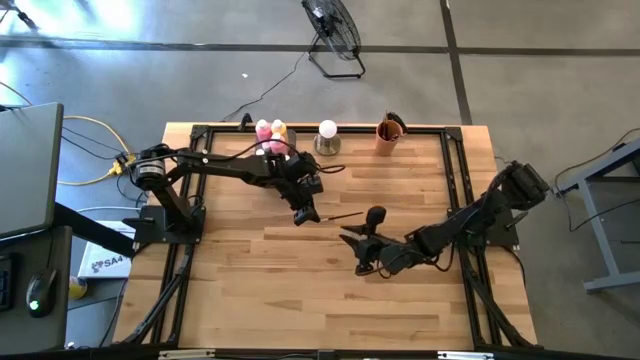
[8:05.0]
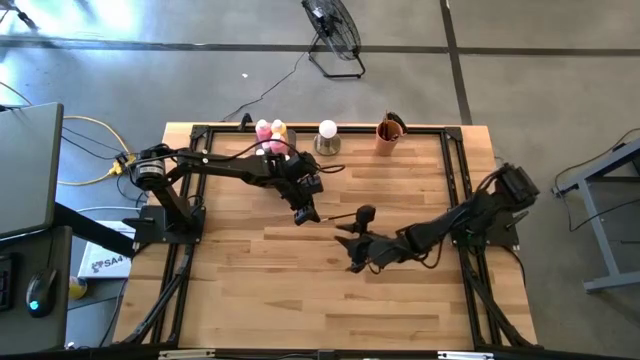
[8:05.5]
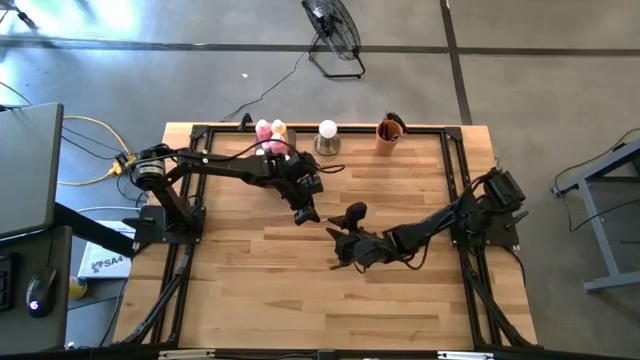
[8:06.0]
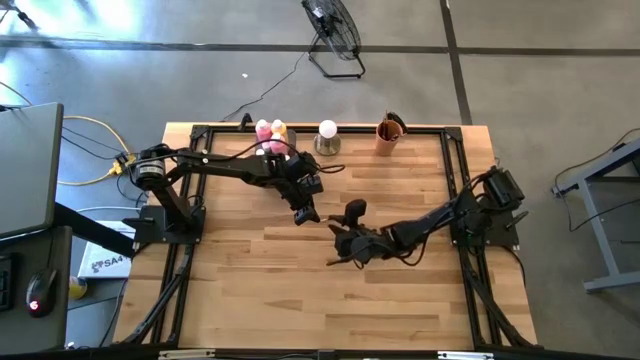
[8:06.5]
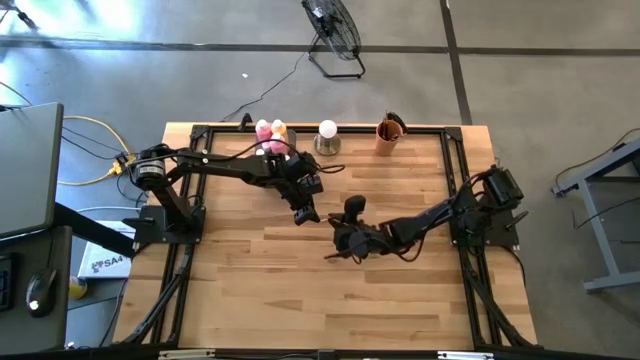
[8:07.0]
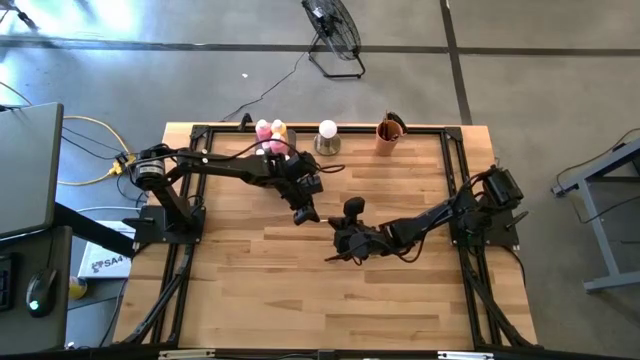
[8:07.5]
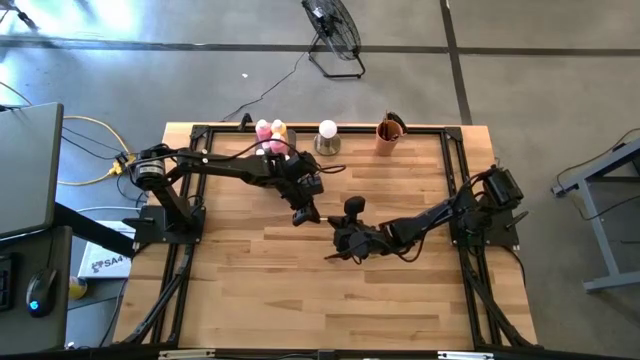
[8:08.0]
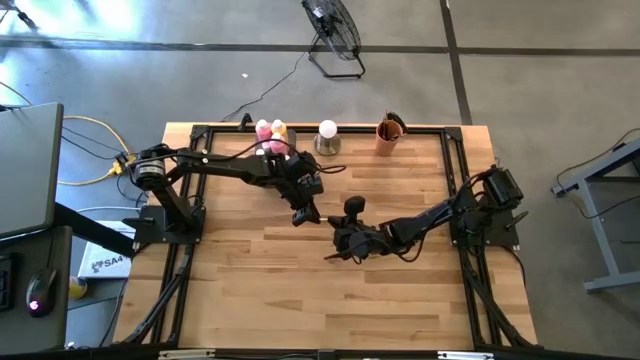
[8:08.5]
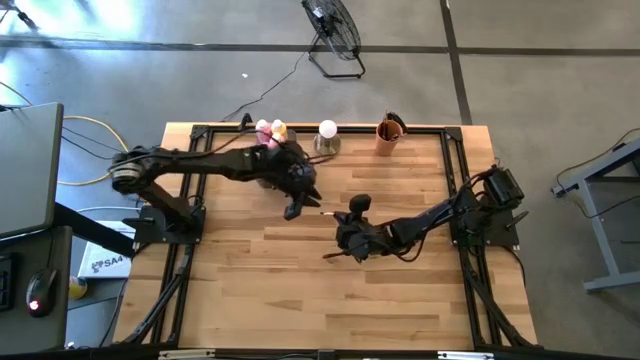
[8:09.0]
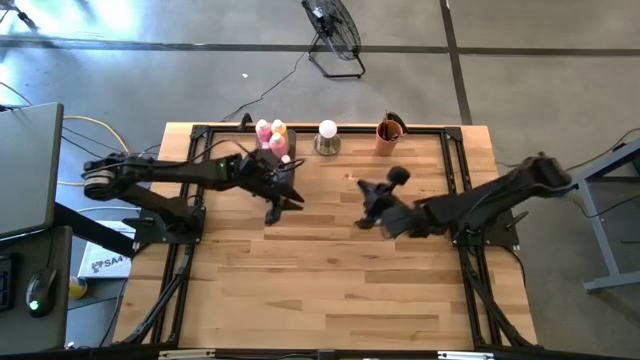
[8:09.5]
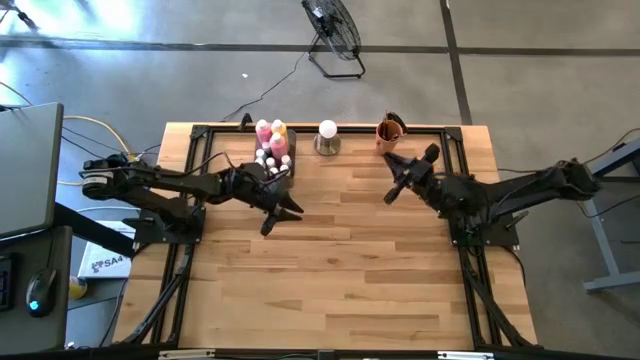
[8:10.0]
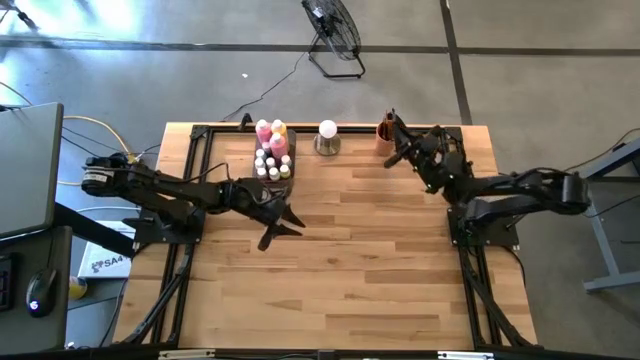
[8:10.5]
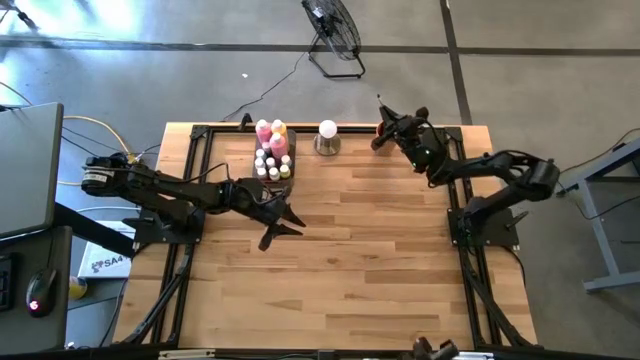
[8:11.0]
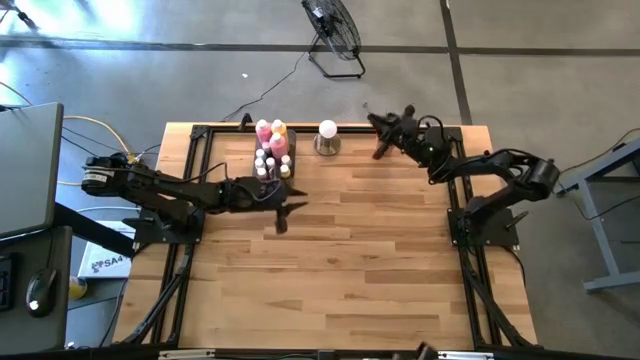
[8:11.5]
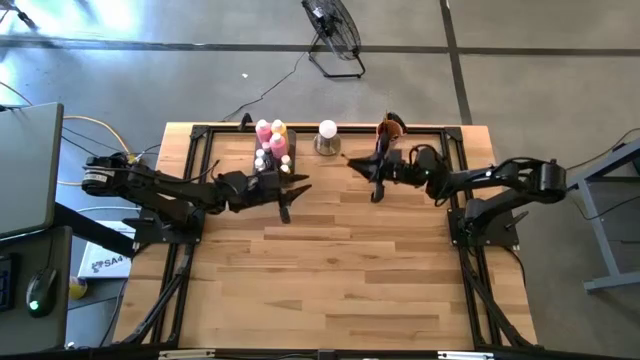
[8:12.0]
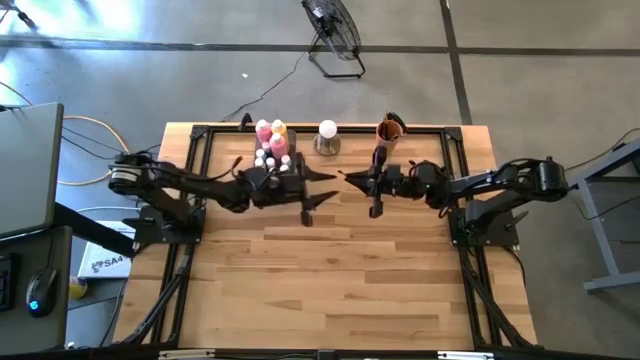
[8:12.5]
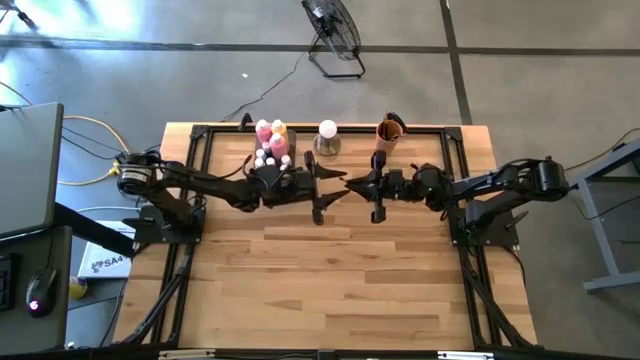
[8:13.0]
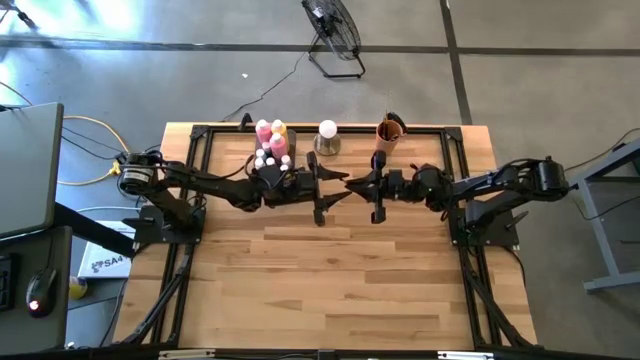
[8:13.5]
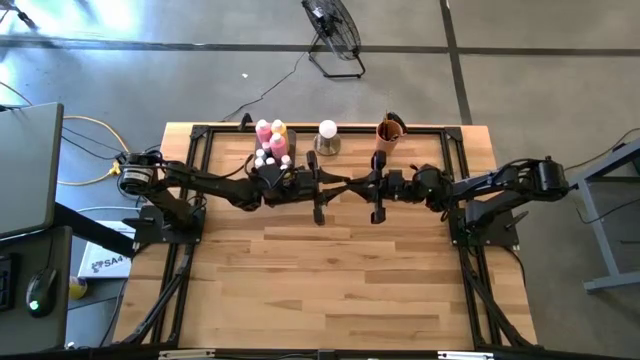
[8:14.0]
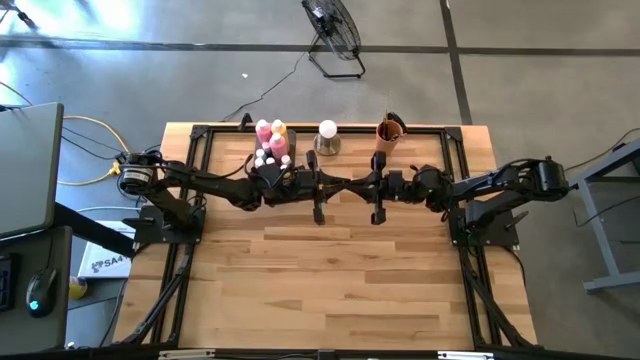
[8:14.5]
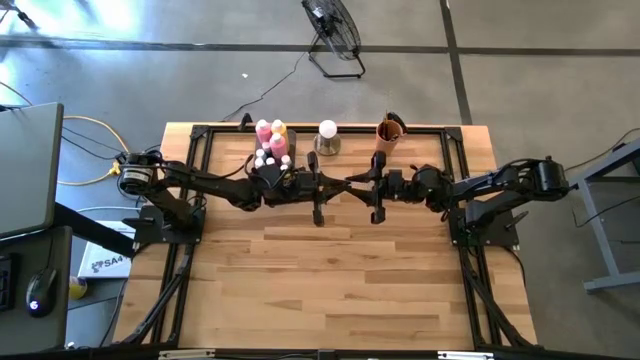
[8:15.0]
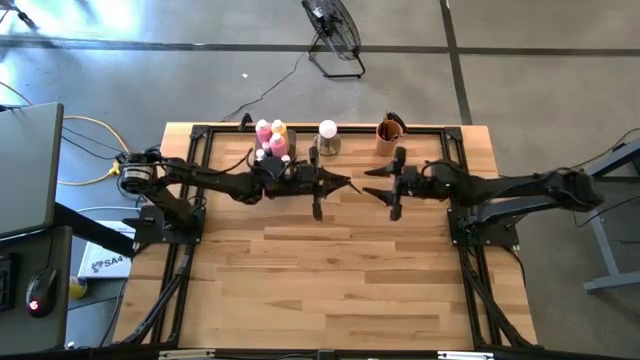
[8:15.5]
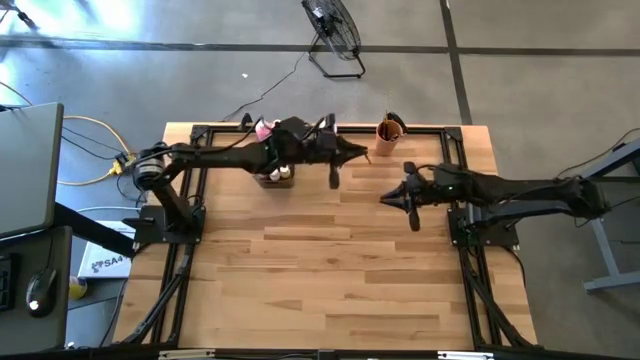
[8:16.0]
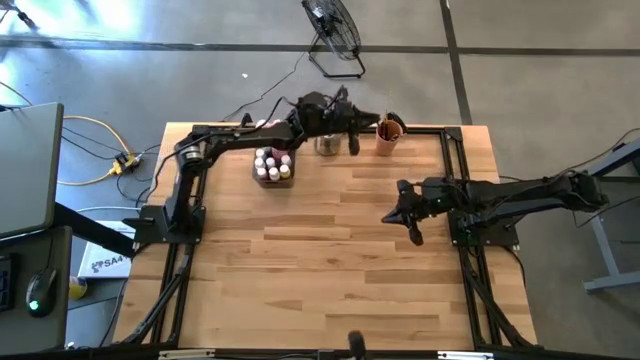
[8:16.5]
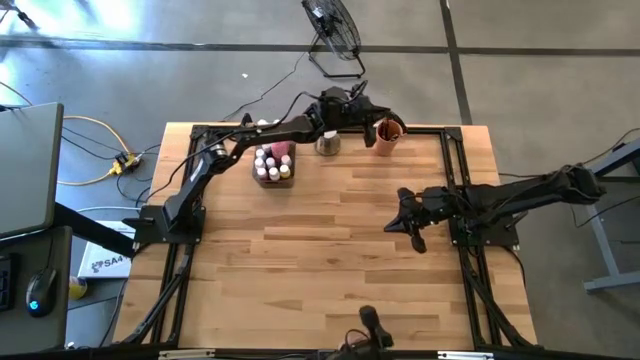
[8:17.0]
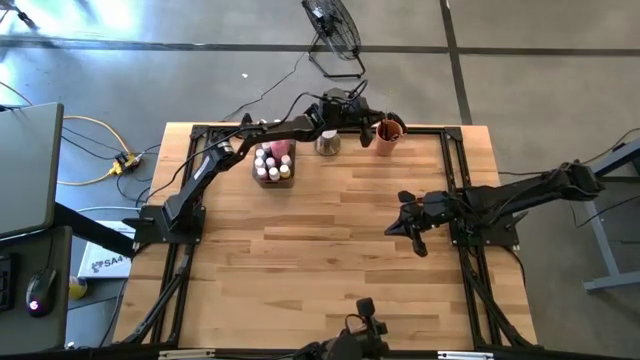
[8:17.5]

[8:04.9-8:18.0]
Task: Pick & Place Paint Supplies
Put the silver paintbrush into the orange cup

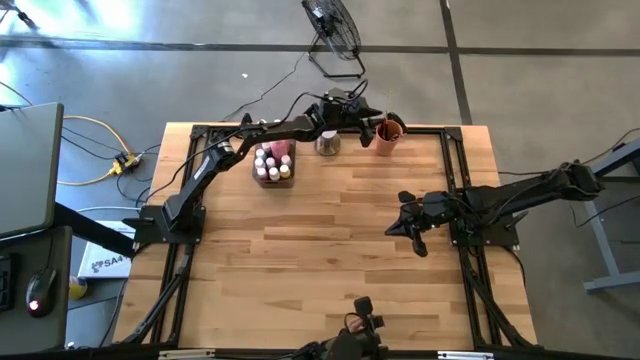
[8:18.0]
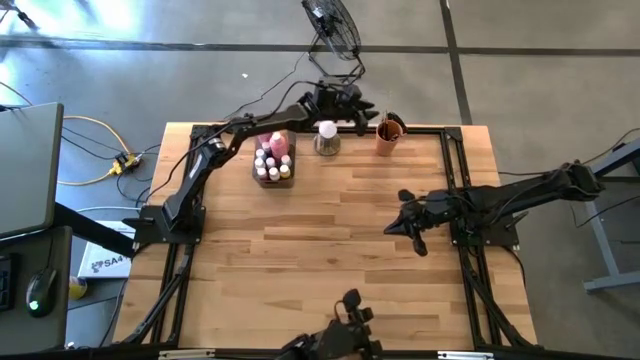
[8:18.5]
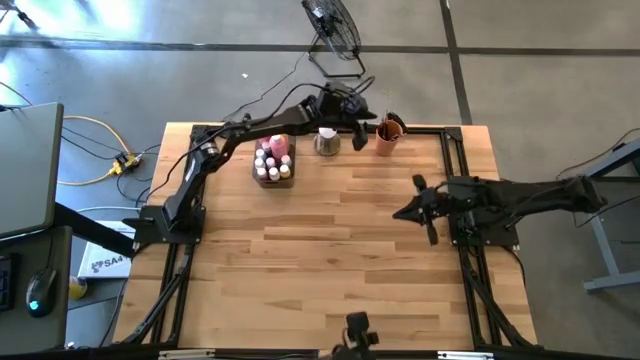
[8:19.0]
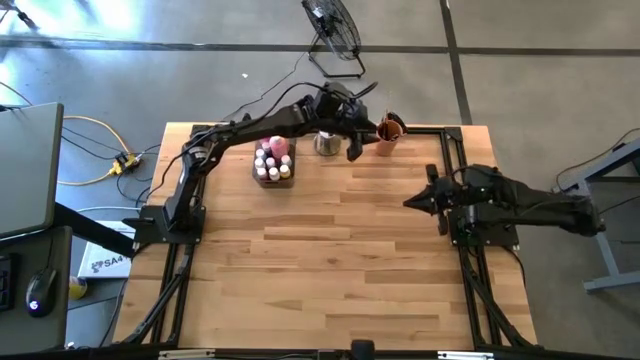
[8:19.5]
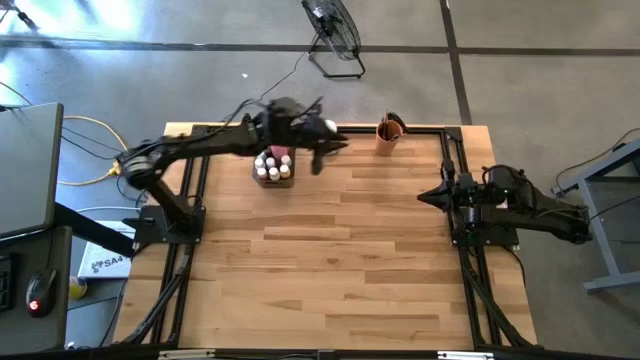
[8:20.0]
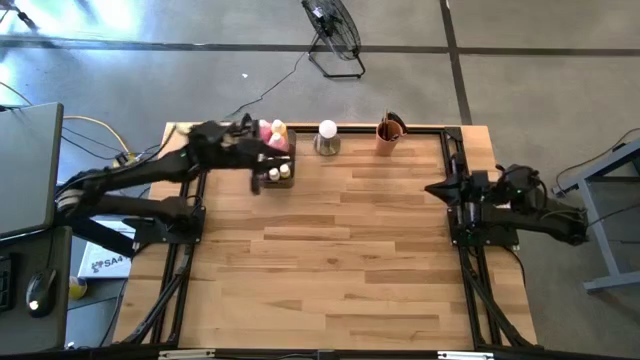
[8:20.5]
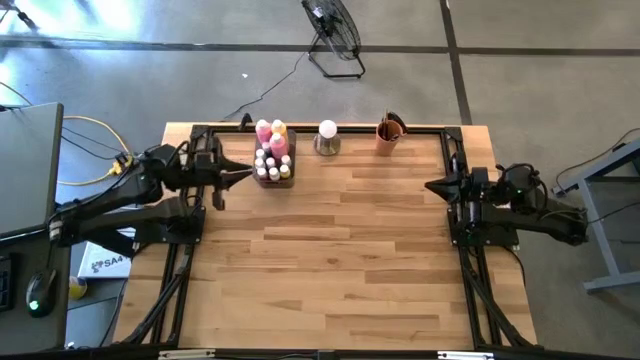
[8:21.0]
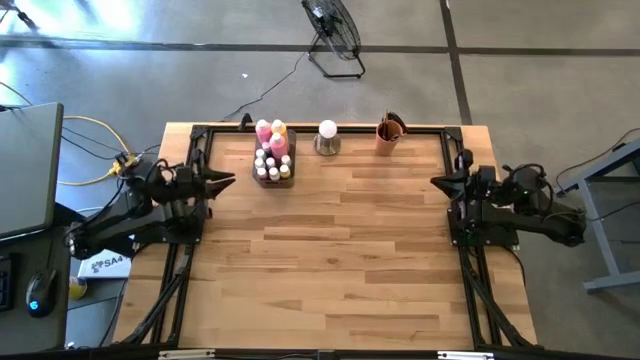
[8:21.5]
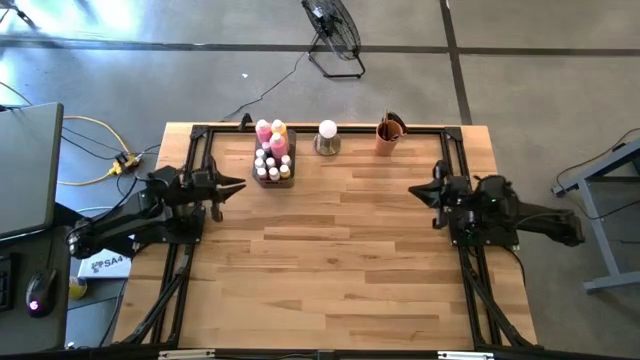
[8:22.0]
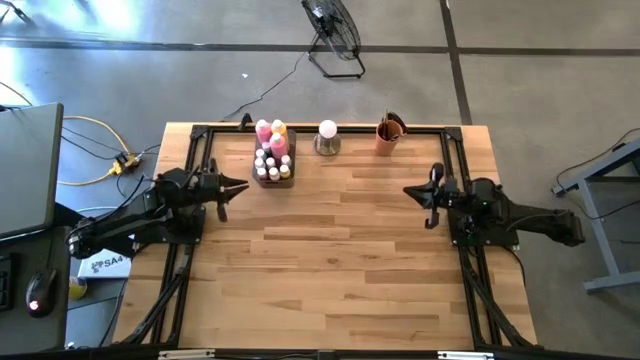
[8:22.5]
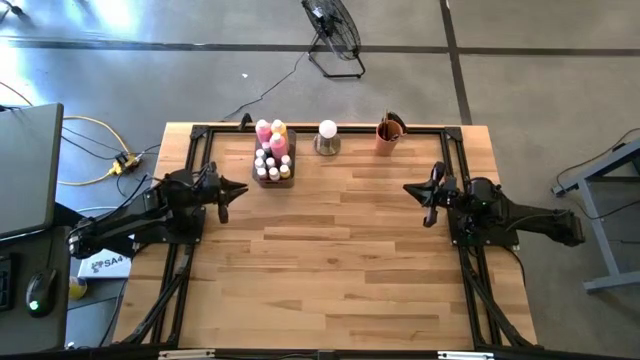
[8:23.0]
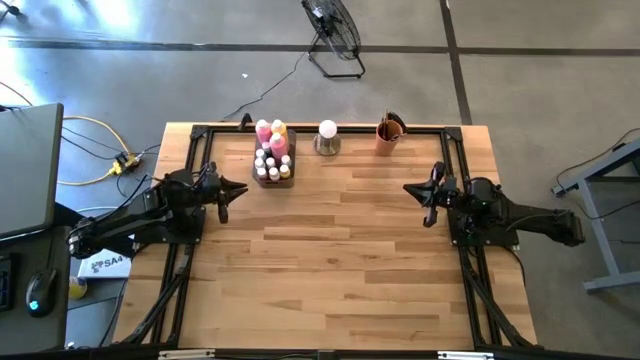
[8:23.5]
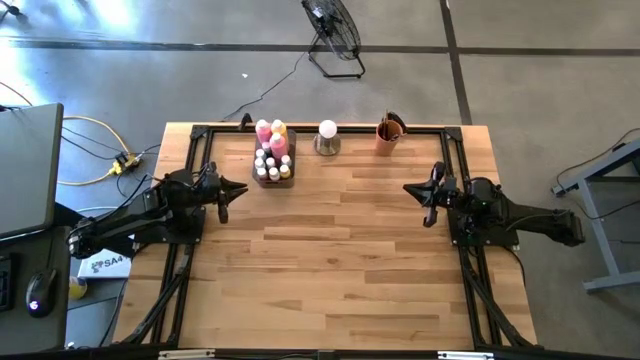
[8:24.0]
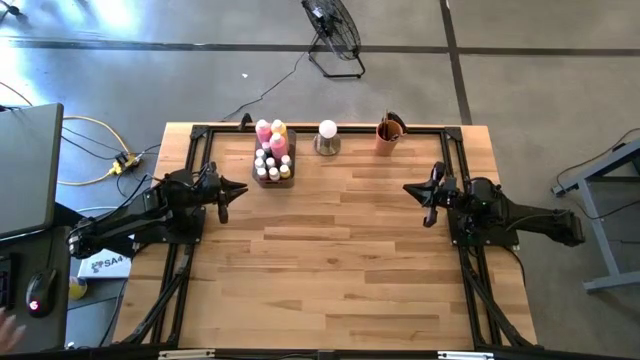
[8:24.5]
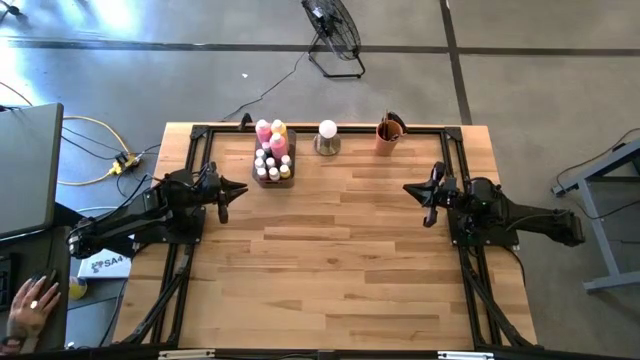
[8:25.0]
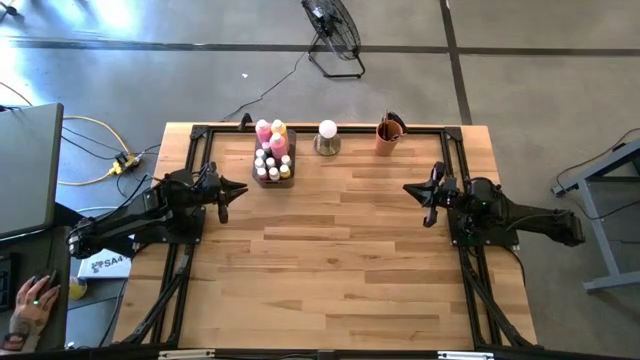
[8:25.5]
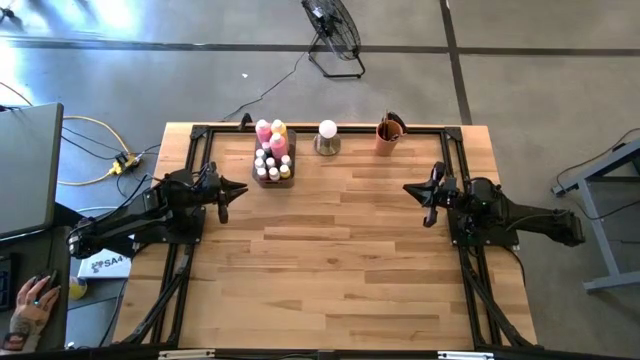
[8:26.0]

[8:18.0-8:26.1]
Return to Home Position

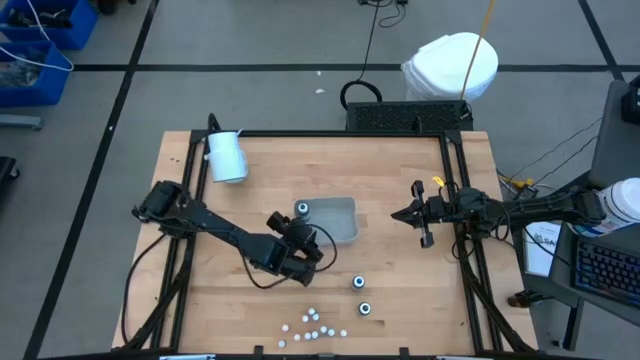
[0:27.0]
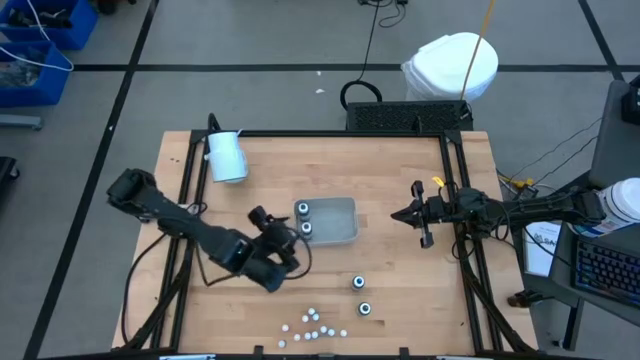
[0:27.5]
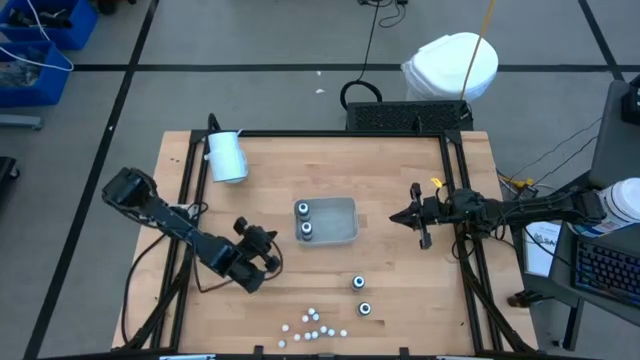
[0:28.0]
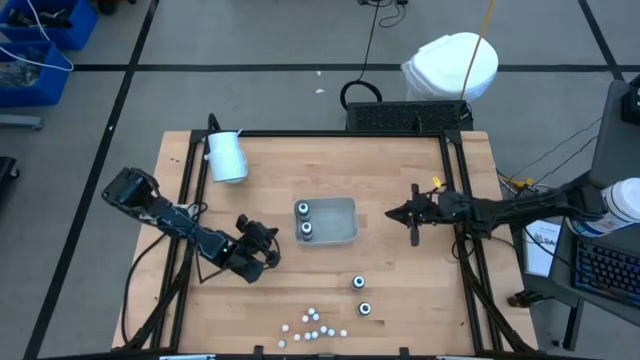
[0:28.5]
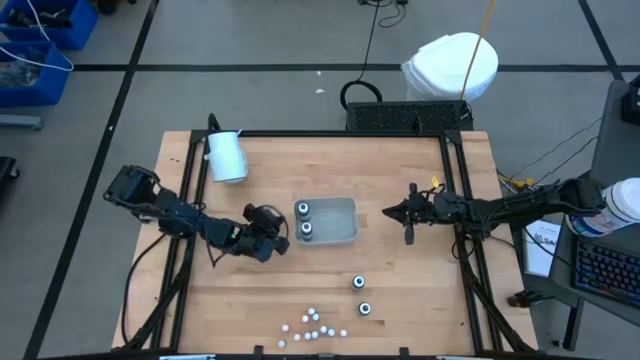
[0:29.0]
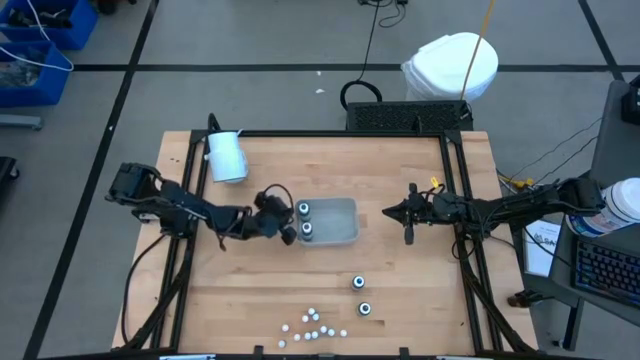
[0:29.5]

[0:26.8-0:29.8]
Task: Pick & Place food coloring
Adjust the gray bin
